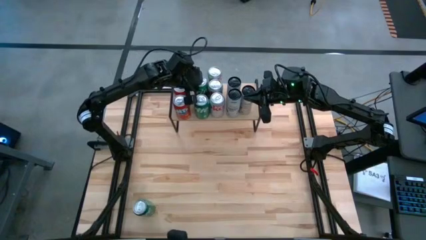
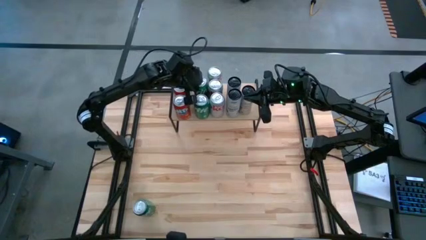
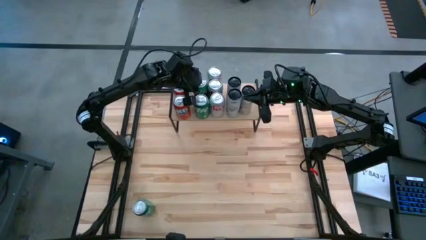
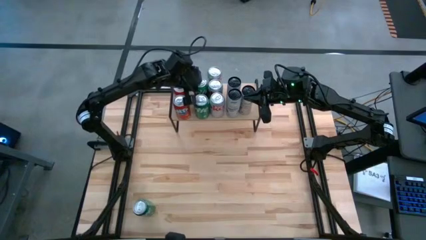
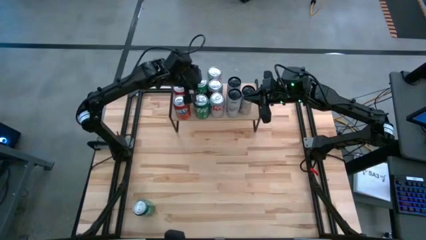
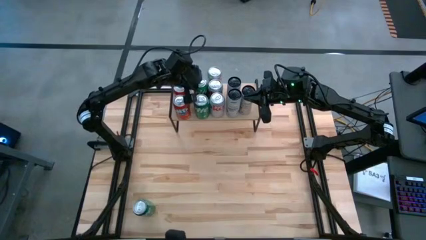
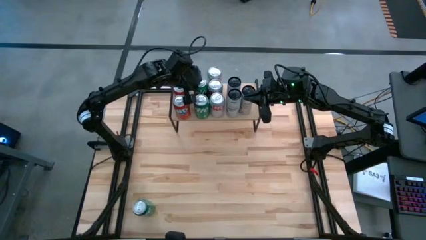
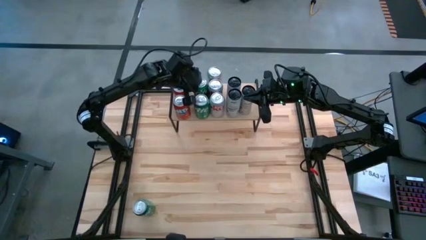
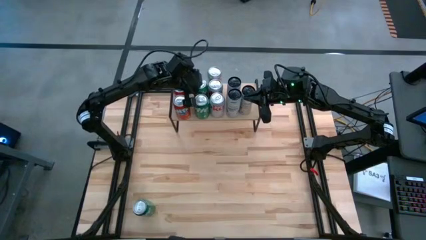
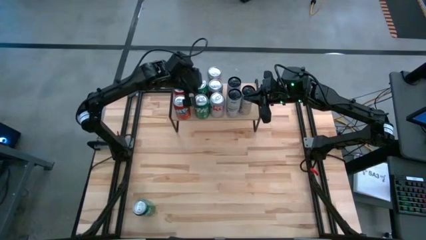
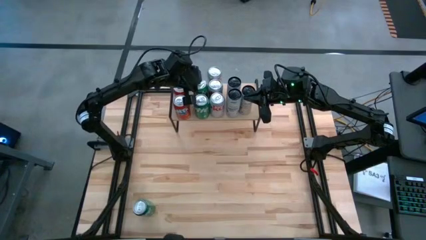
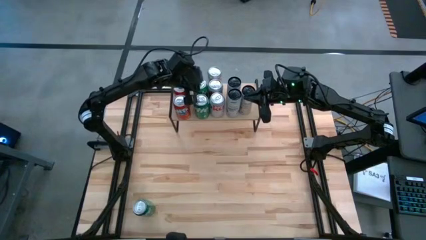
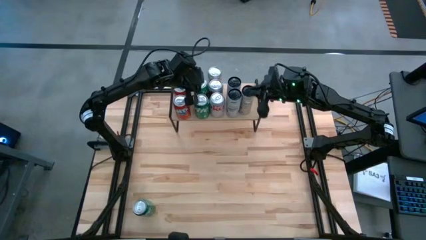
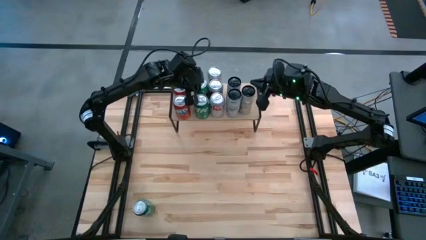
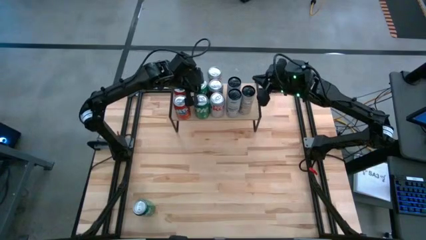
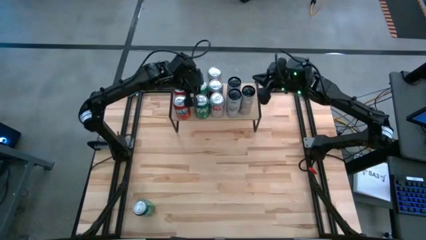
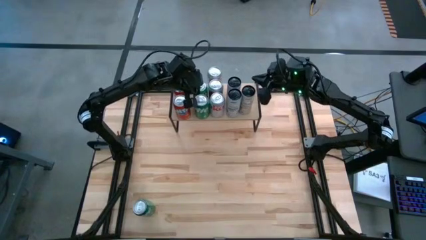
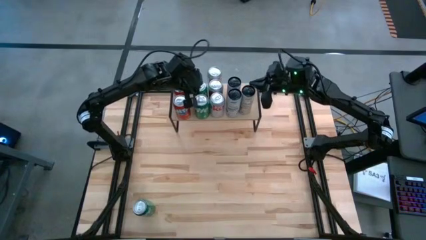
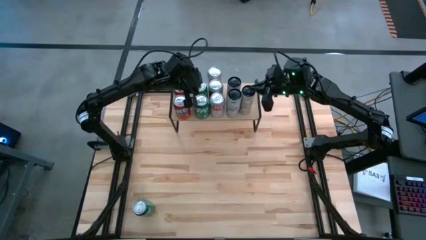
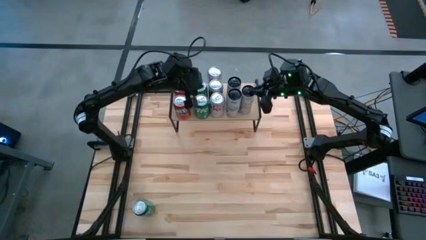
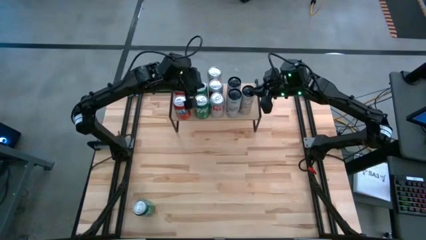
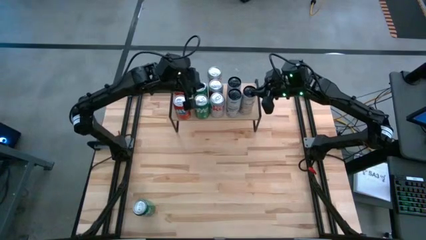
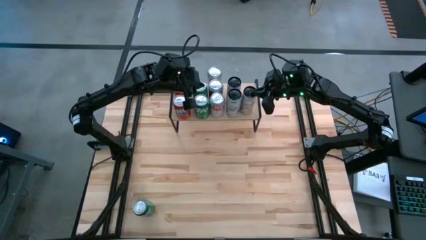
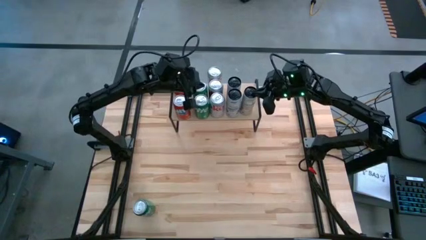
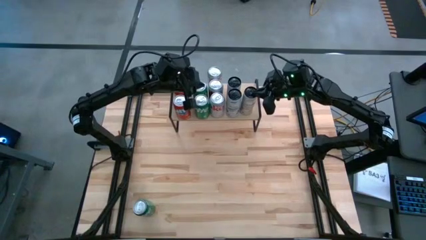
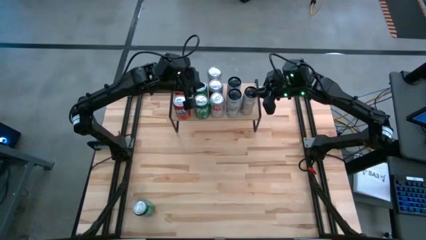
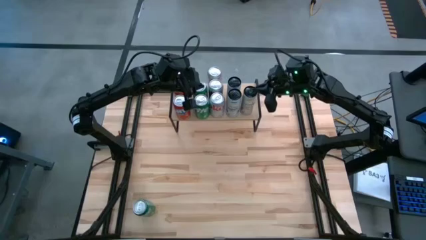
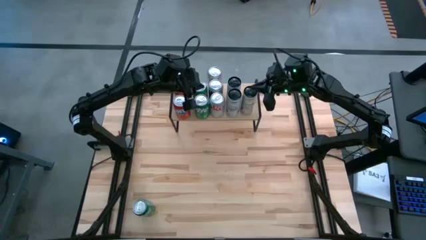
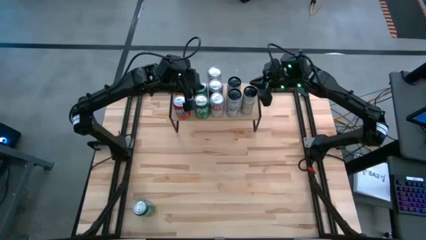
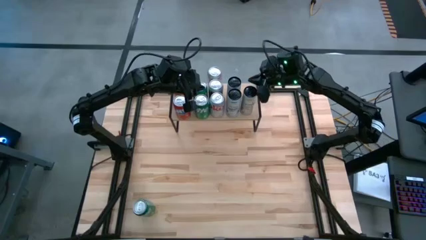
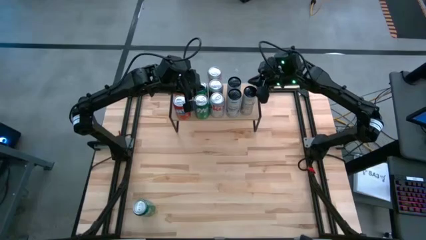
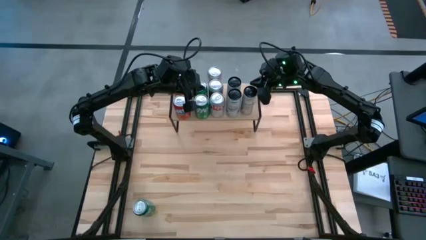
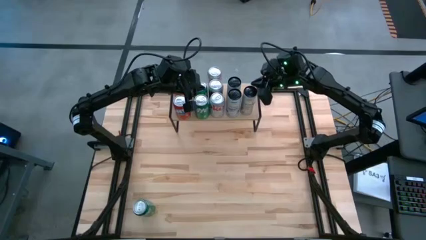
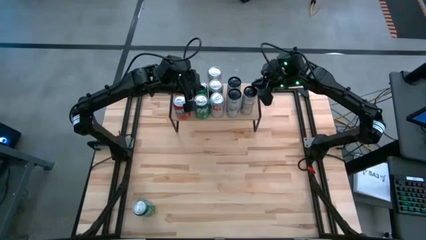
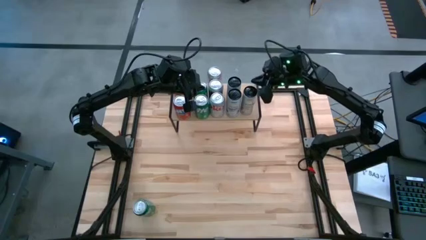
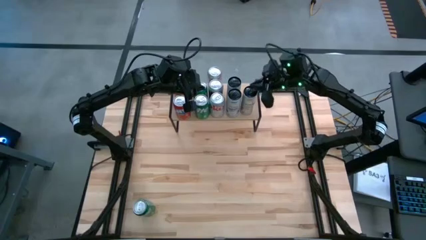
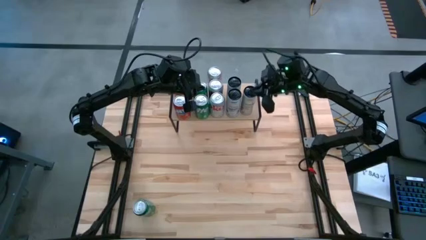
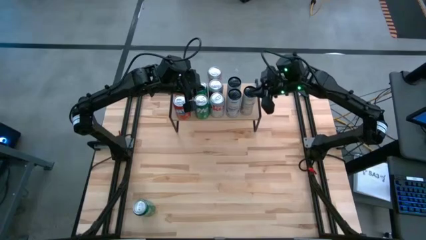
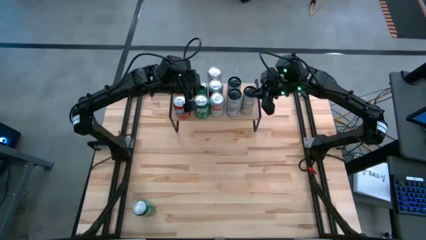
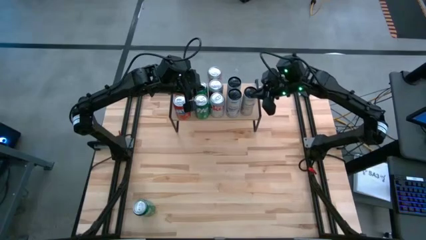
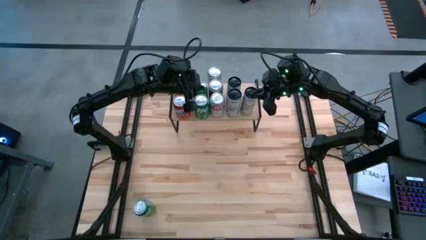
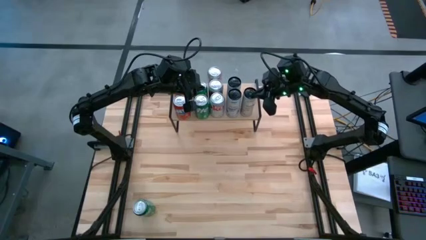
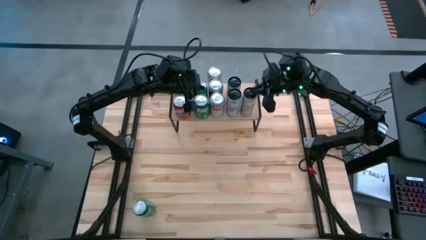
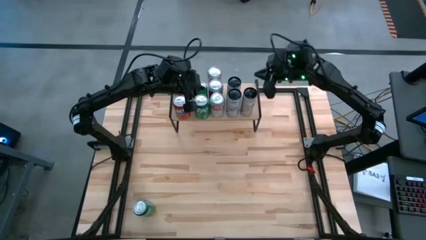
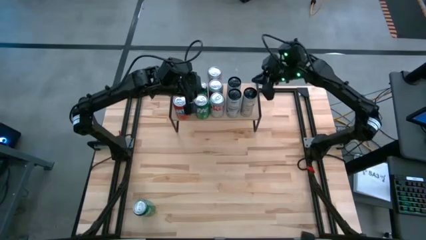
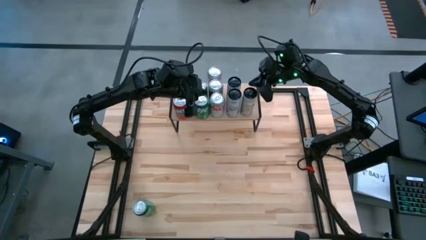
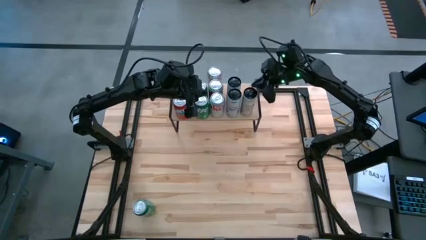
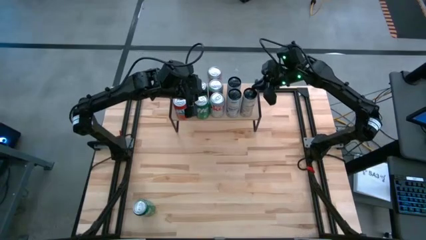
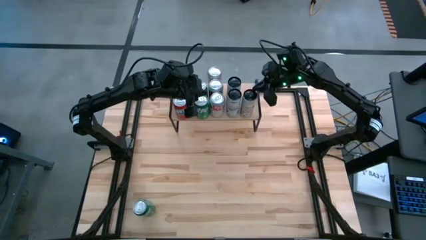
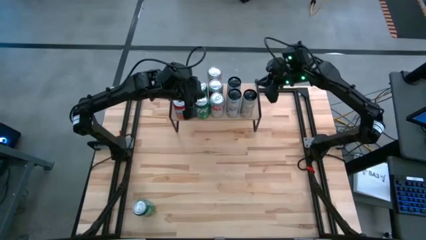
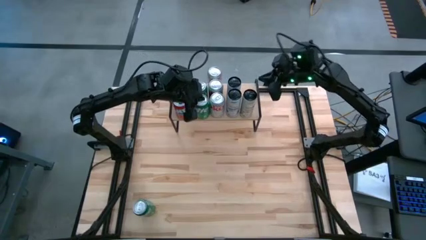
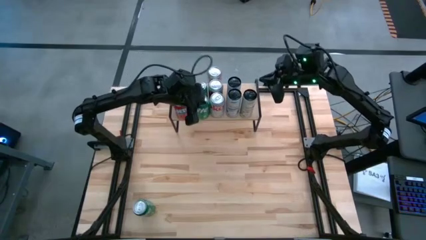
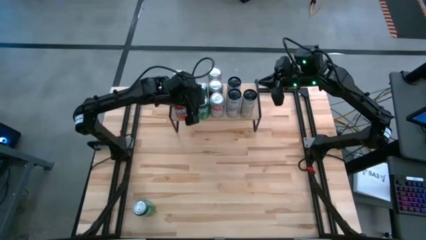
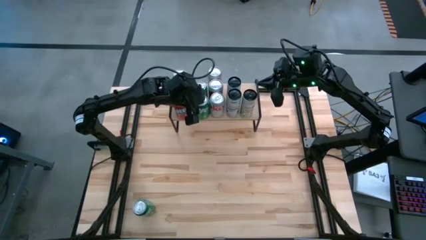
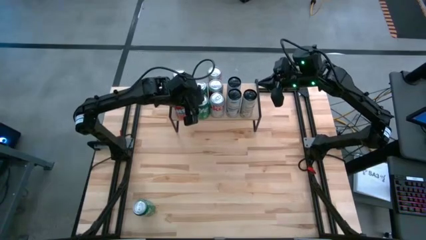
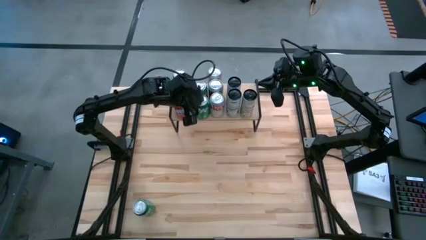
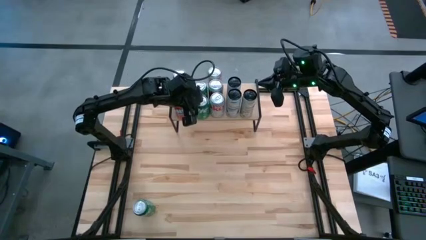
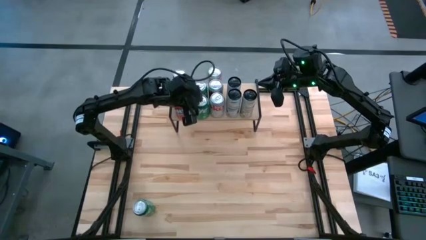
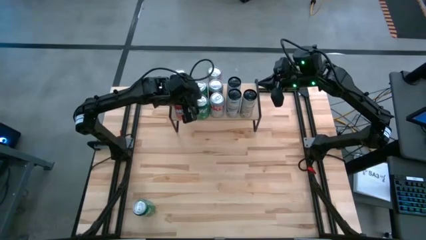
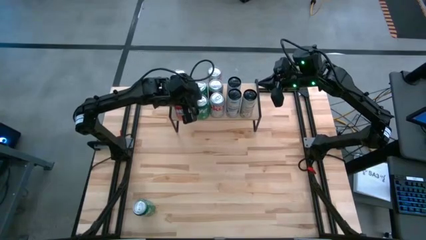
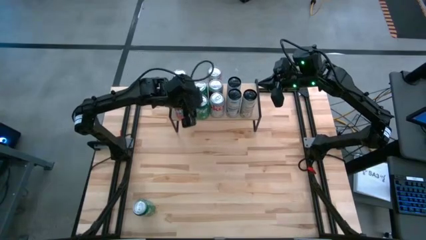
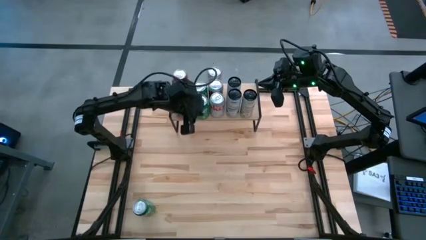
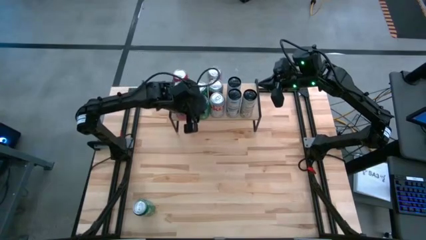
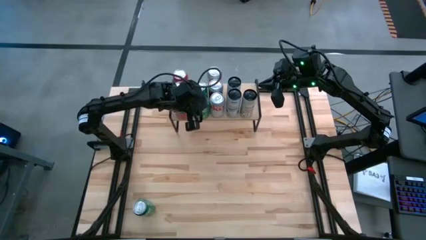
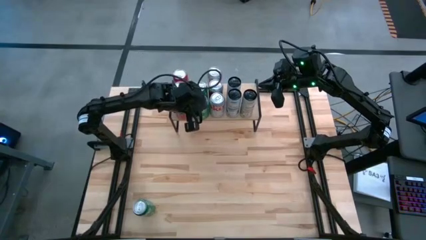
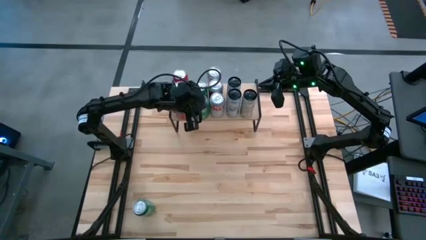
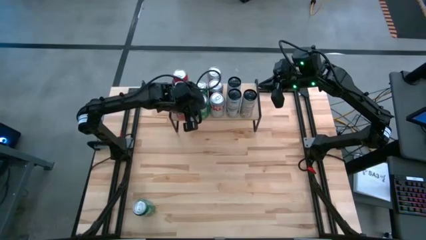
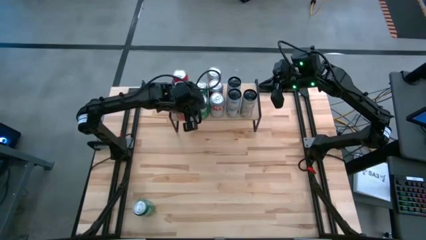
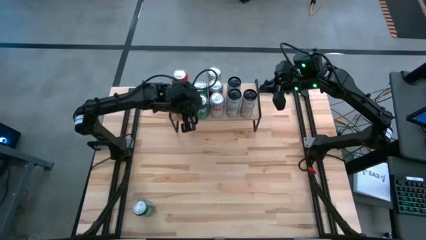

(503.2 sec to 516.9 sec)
Task: Place canned beverage on shelf
Adjust the soda cans on the shelf

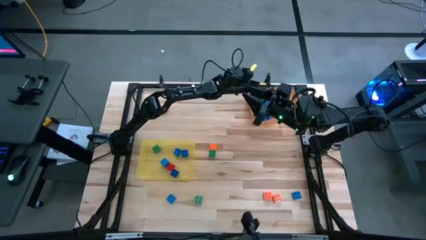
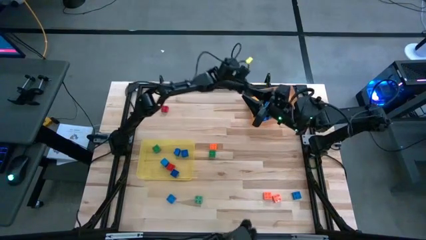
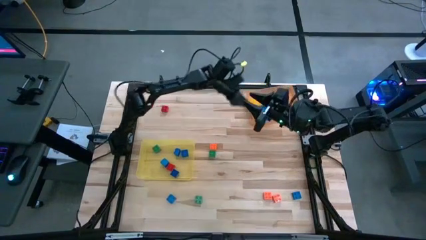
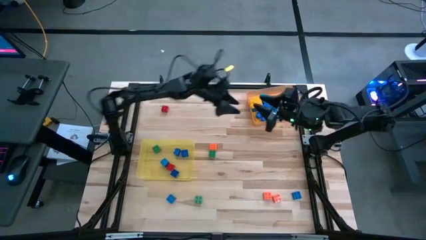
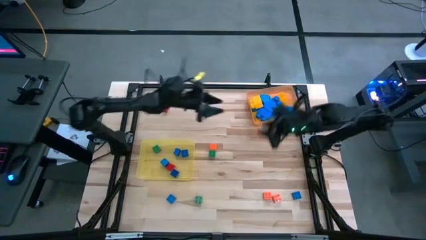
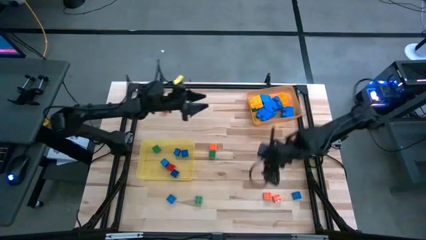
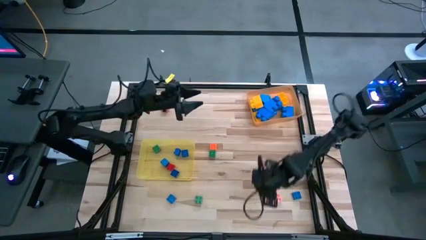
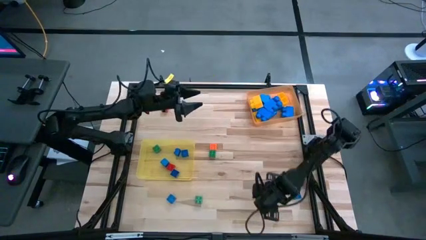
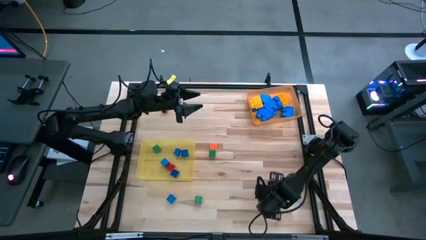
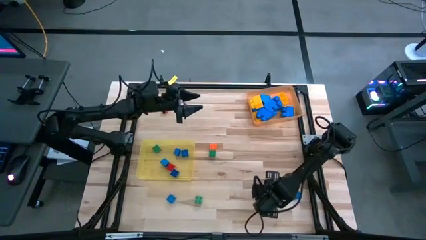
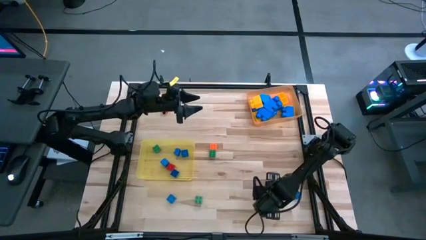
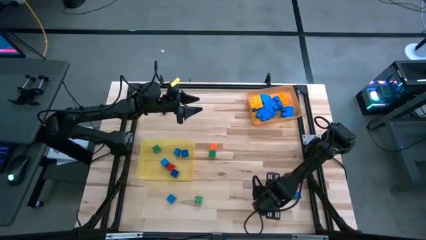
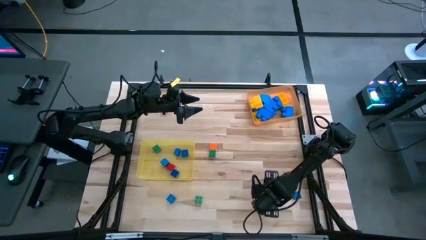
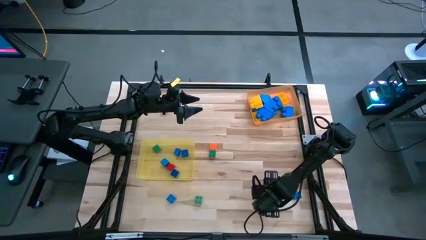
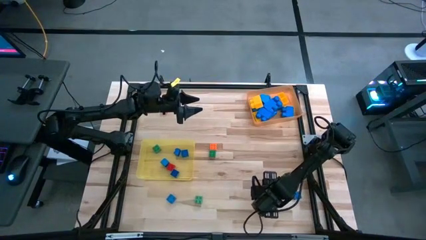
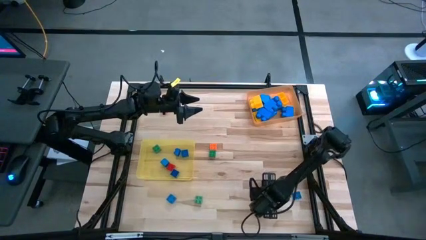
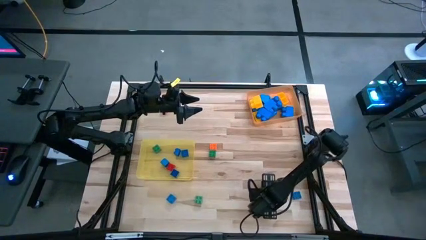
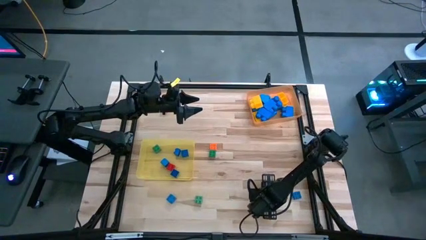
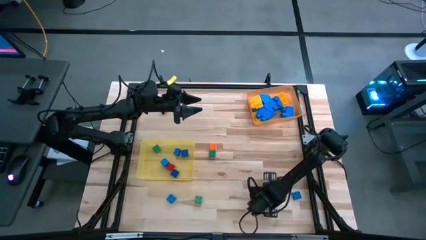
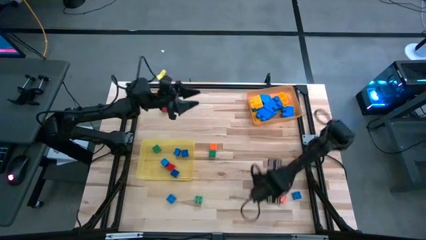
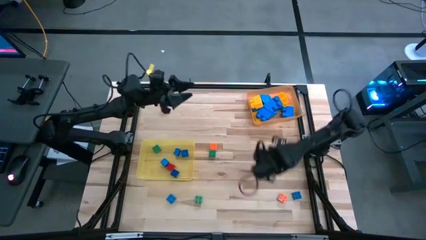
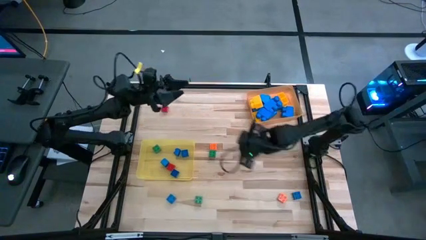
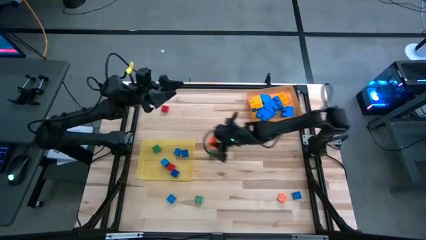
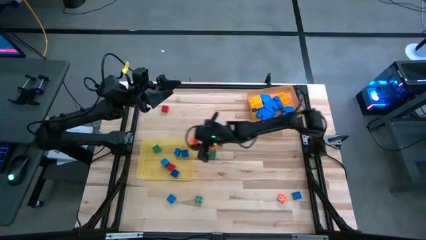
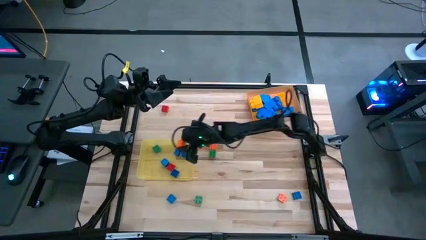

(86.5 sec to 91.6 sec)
Task: Sort blocks by size
Put the small orange 4 stud game piece into the yellow bin
